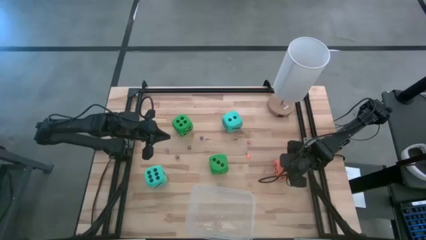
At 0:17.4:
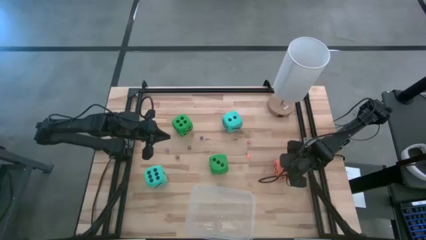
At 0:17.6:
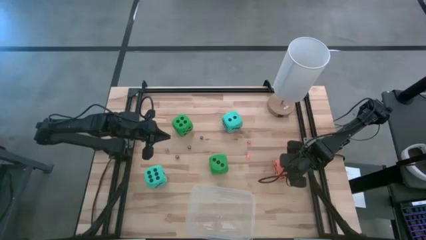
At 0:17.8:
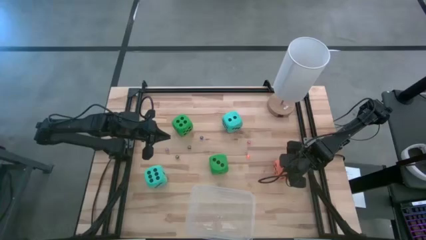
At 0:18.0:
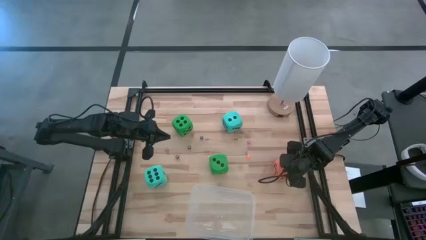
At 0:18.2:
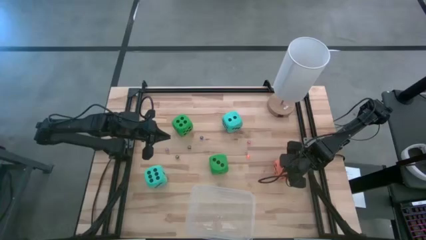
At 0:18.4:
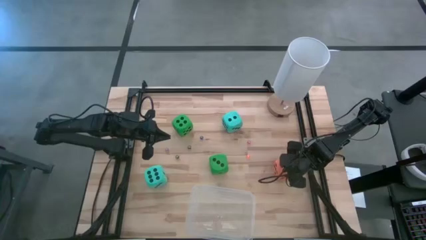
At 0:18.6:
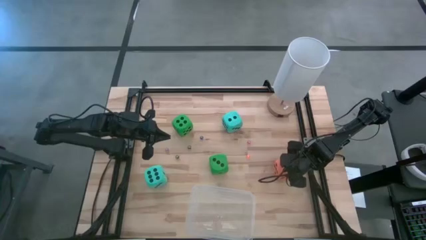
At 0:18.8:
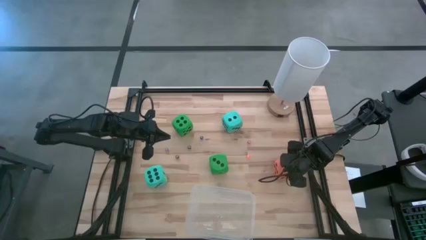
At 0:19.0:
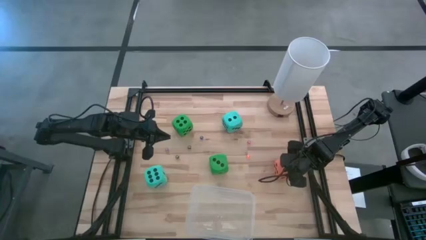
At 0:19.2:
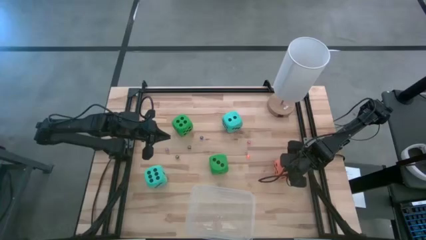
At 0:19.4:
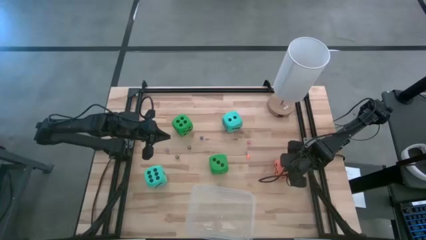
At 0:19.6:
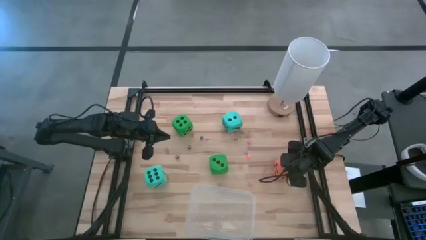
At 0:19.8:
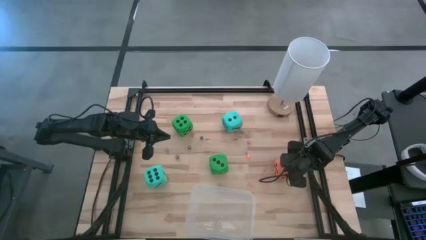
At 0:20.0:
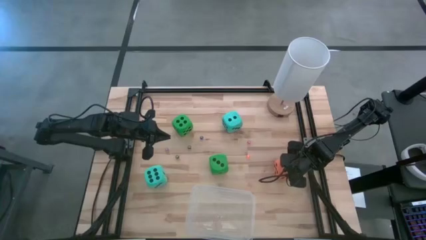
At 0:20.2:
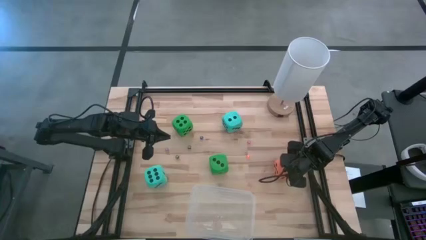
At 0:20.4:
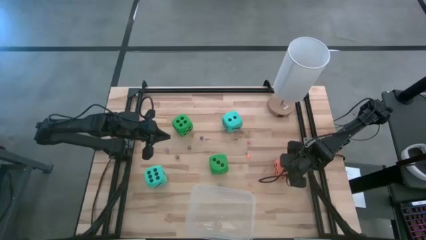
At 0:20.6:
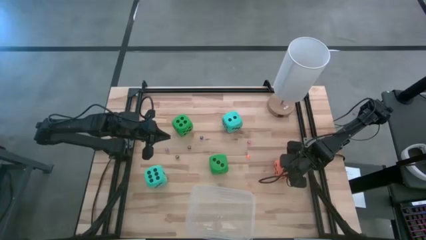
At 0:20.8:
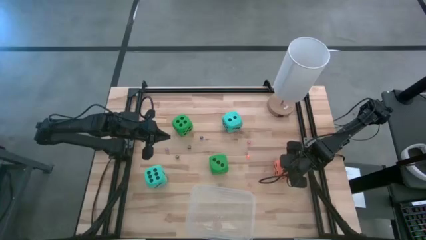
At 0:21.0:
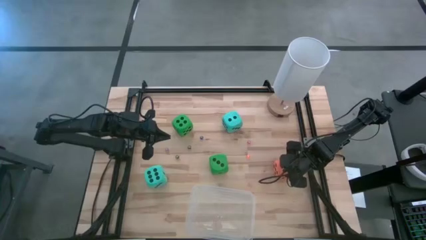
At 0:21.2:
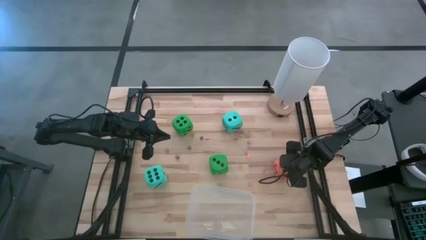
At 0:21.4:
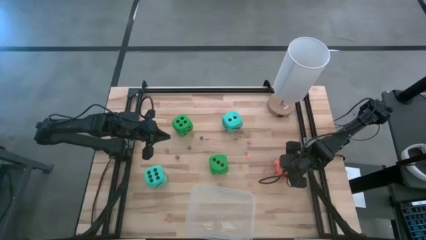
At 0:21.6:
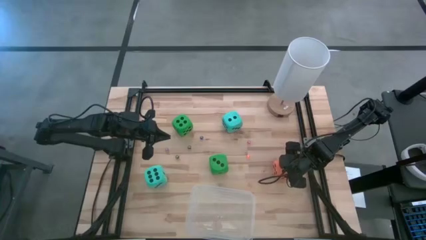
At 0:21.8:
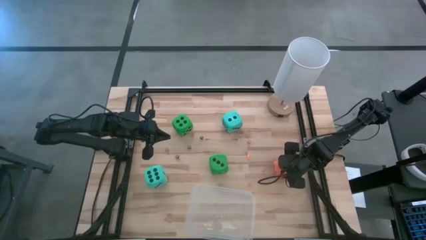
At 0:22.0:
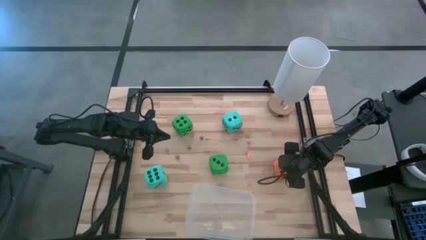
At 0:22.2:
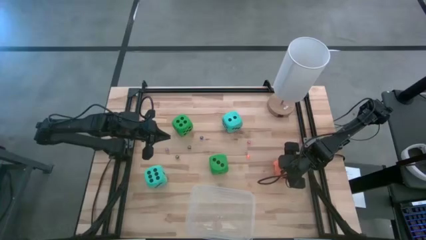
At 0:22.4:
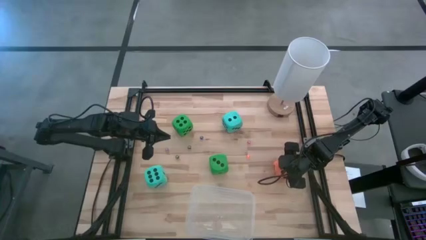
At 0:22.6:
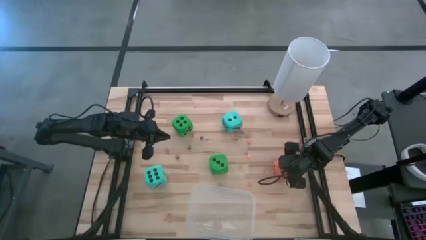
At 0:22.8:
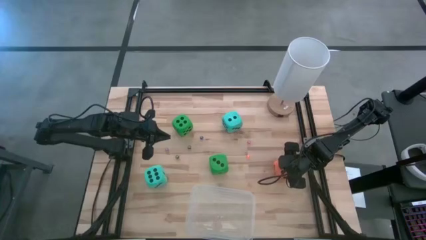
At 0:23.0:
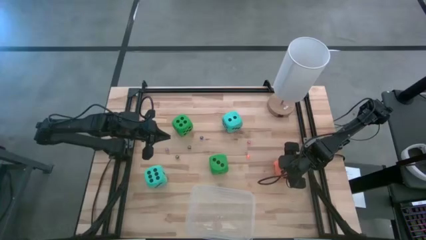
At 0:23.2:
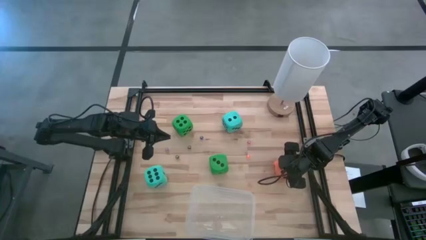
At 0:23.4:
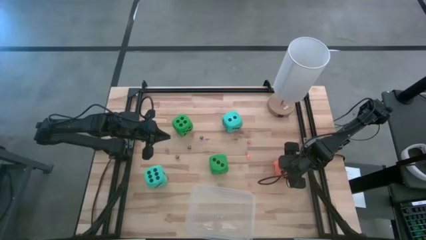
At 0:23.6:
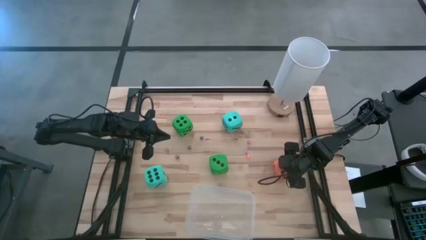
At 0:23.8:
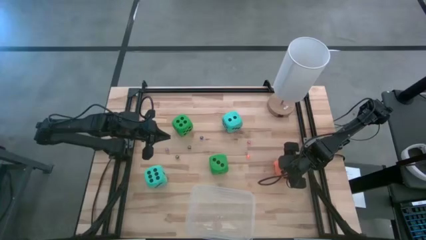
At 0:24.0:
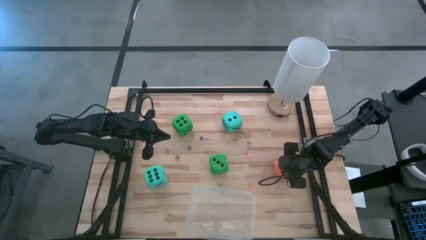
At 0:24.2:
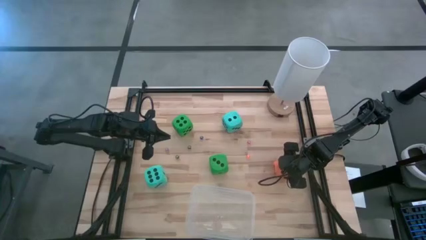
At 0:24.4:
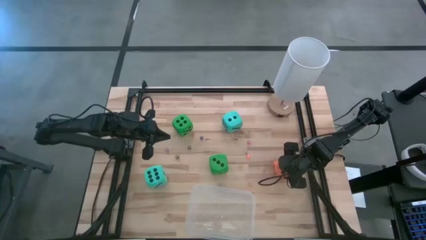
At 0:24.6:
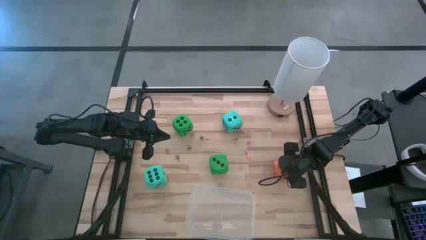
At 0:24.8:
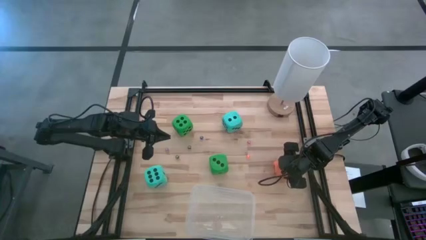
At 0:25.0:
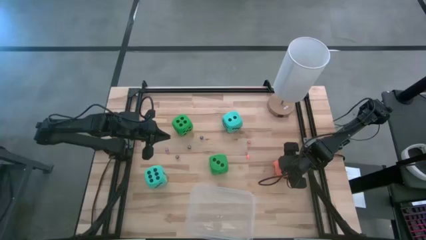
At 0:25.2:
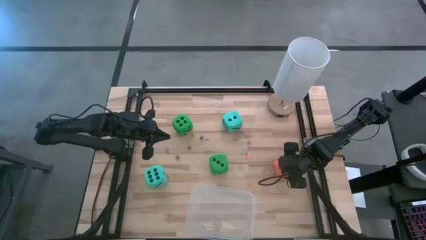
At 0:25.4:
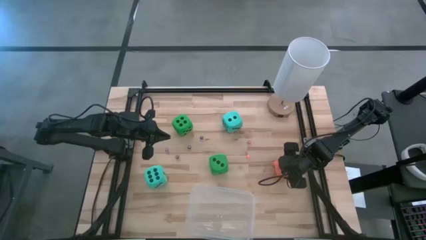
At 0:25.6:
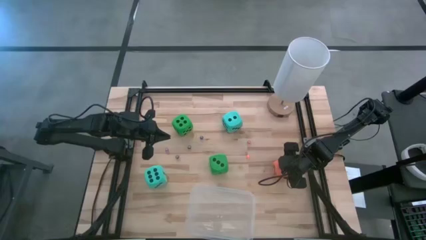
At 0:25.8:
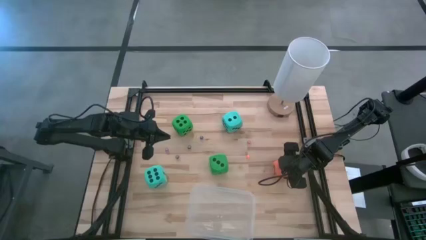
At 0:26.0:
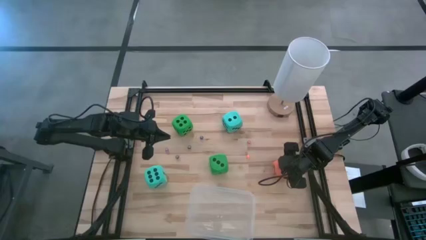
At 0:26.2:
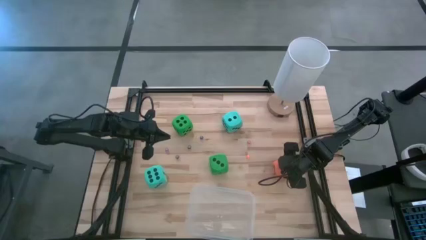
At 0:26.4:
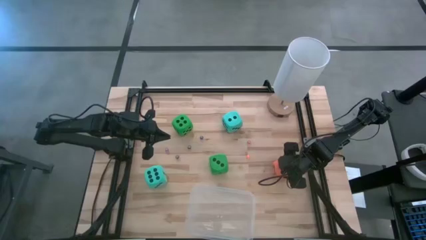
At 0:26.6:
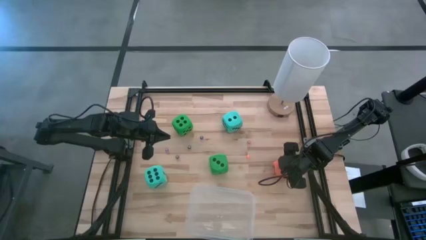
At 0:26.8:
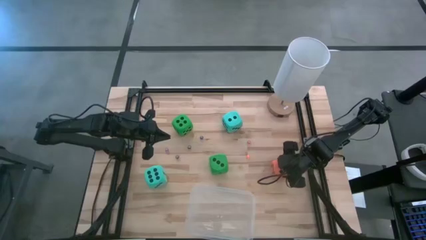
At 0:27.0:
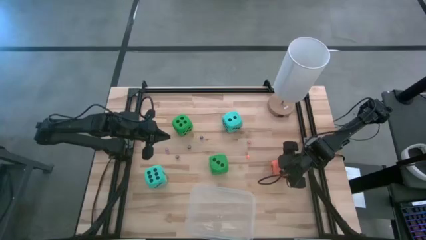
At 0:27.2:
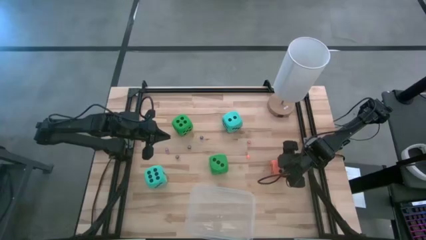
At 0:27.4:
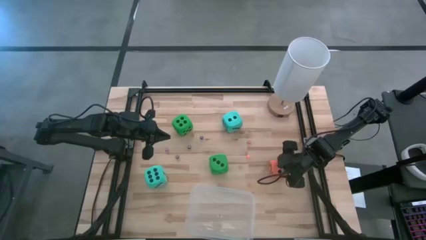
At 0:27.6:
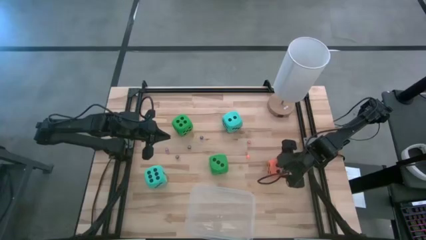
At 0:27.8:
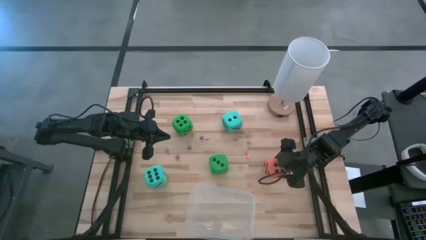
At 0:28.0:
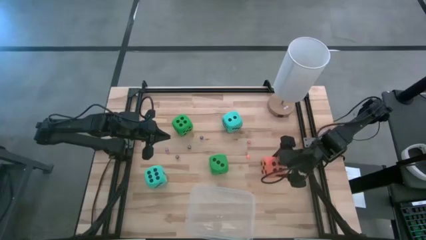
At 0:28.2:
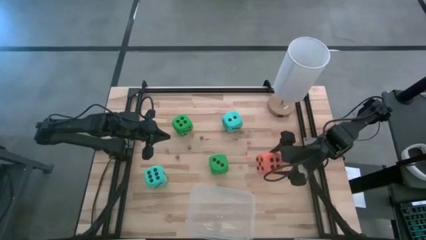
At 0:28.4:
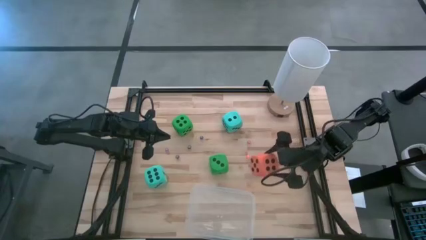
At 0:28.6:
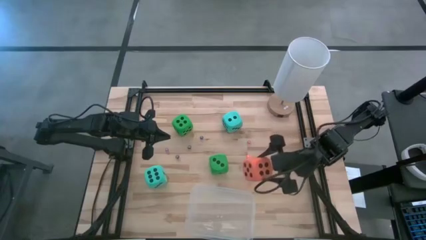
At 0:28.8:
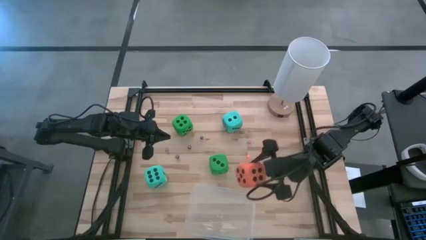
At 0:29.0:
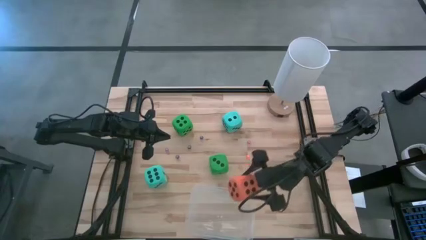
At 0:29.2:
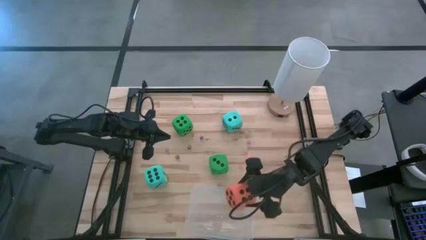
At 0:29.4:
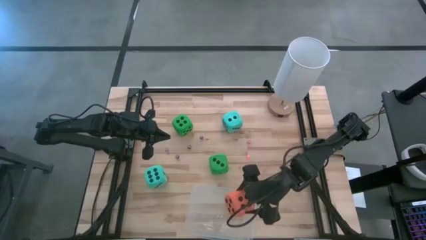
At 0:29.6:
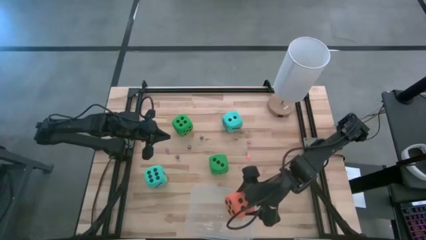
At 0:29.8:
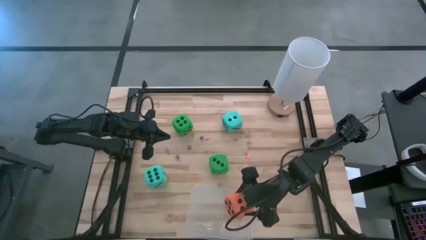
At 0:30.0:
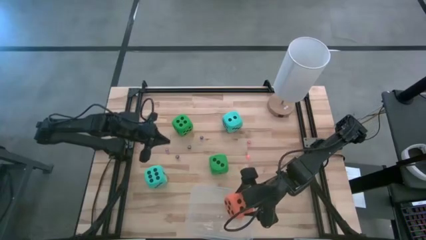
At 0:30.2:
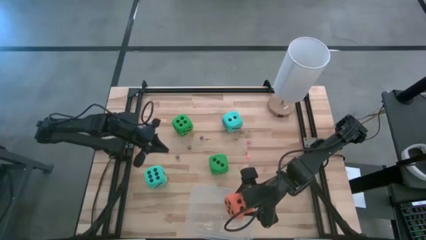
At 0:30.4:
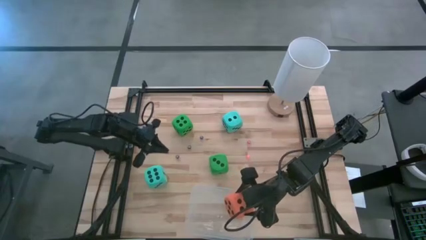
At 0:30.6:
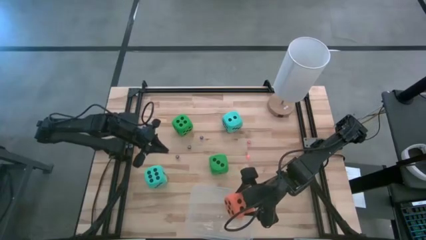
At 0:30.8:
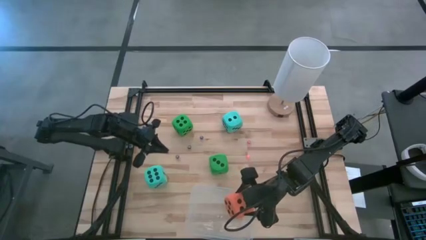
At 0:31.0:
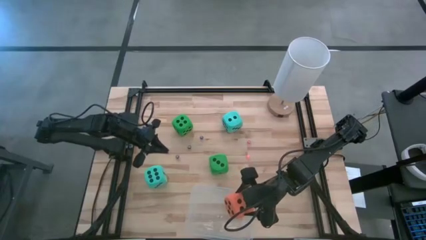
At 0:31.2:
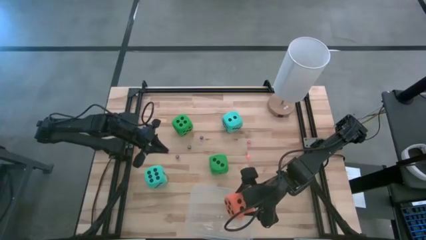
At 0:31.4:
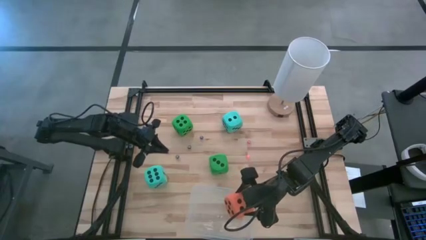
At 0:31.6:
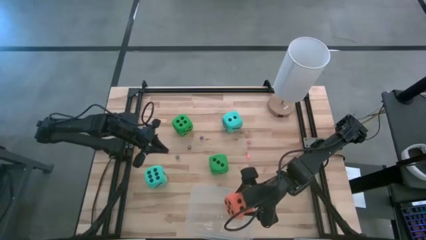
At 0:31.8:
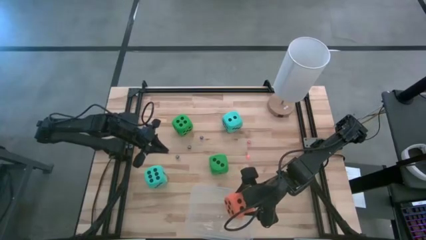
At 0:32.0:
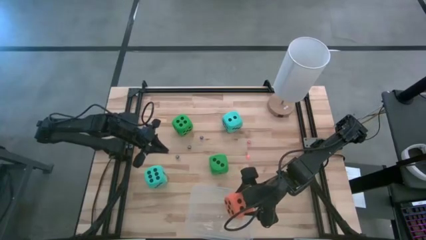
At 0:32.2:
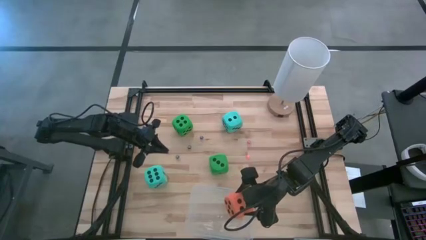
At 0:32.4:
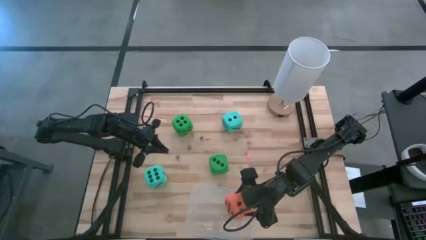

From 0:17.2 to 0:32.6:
Task: Pick & Place Dice
Put the large orange dice into the transparent bin
